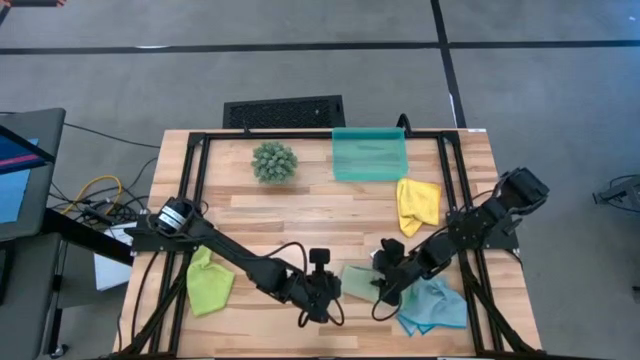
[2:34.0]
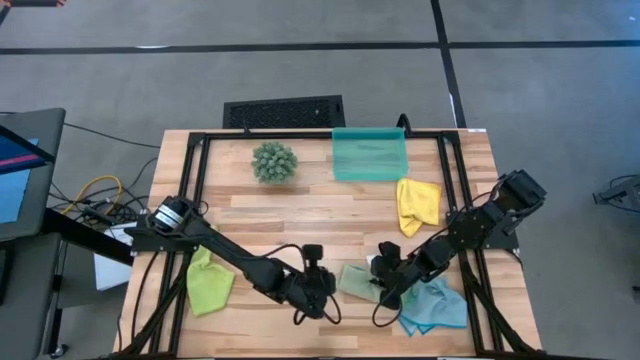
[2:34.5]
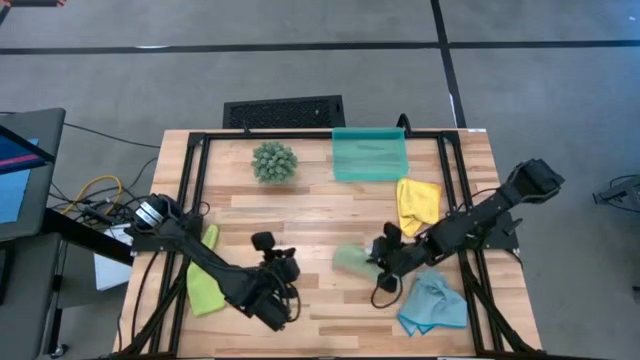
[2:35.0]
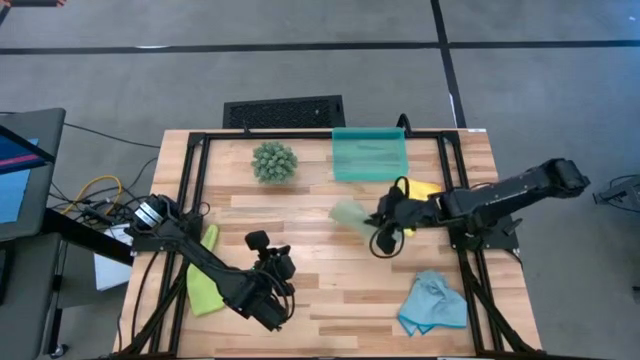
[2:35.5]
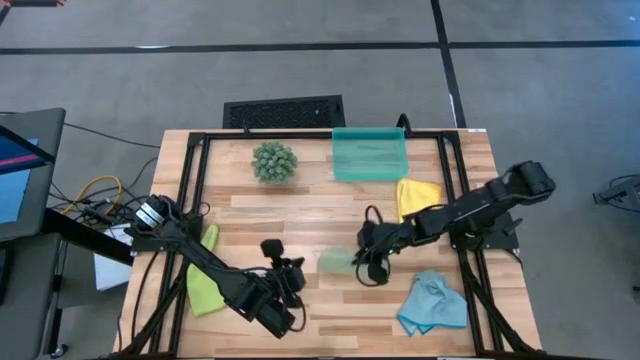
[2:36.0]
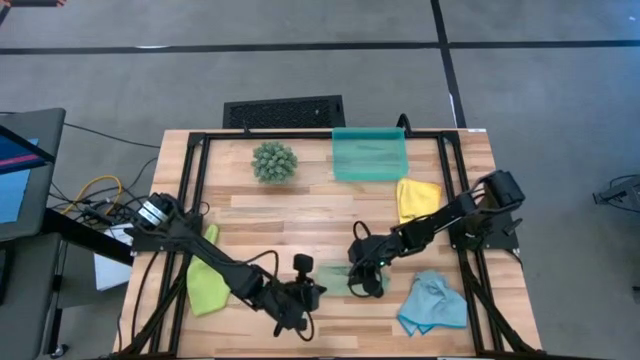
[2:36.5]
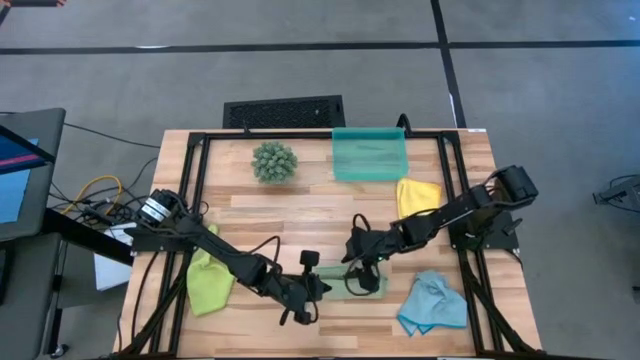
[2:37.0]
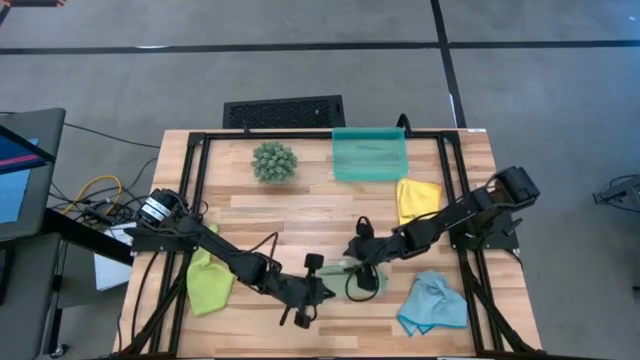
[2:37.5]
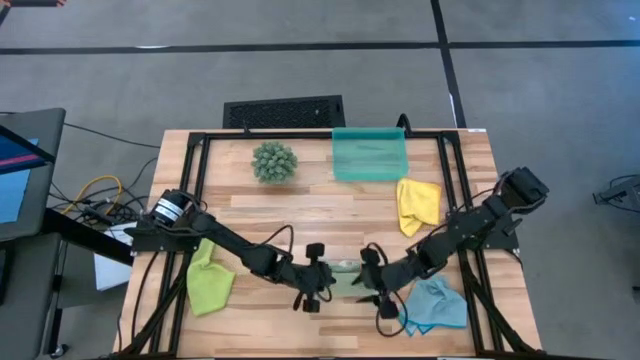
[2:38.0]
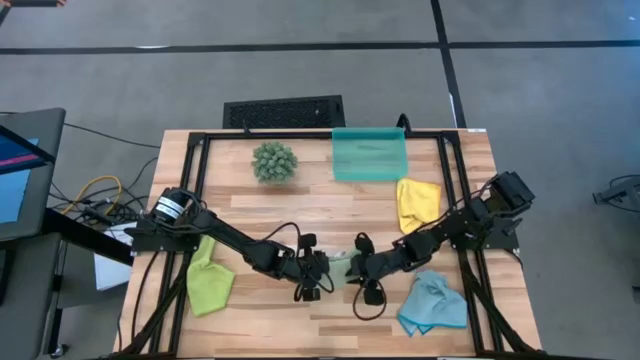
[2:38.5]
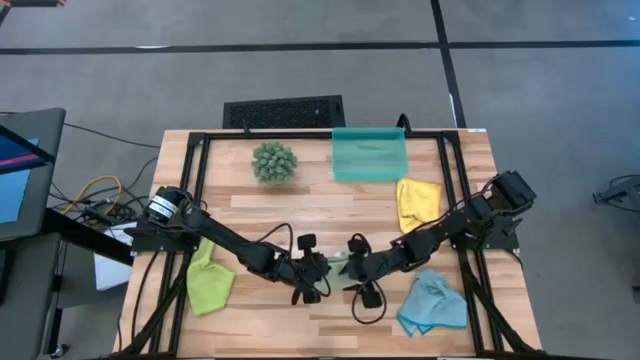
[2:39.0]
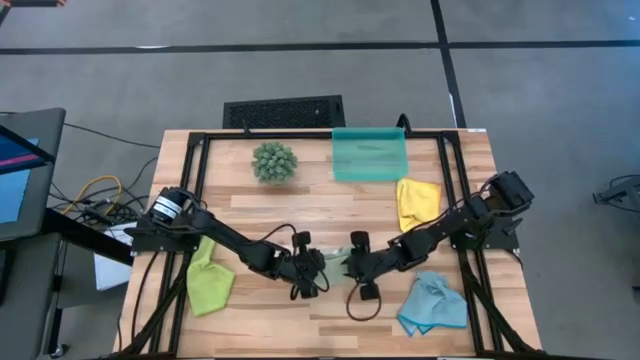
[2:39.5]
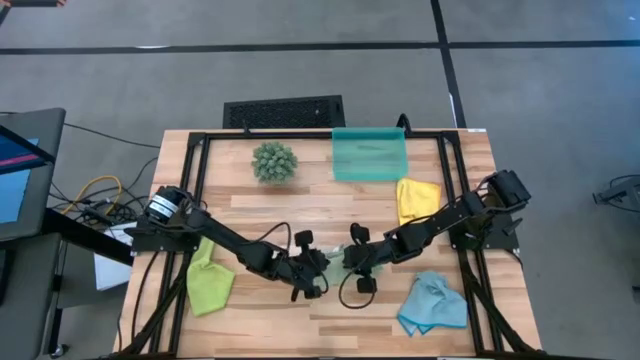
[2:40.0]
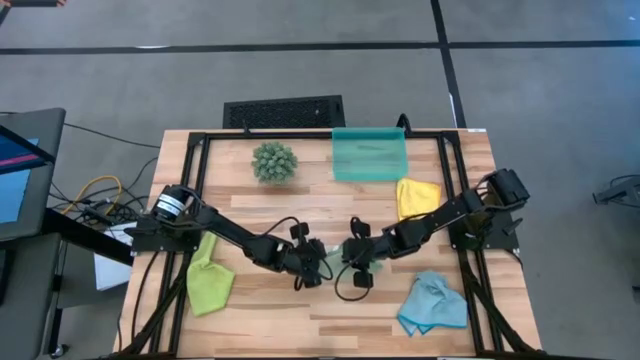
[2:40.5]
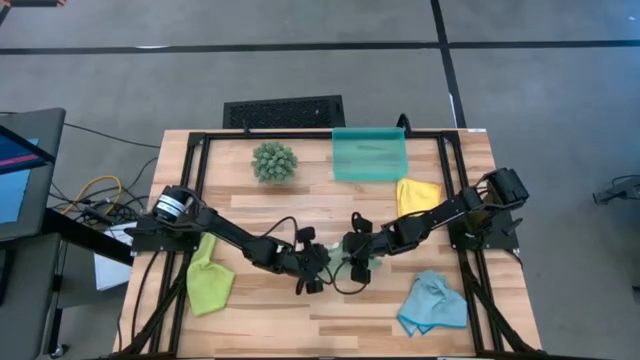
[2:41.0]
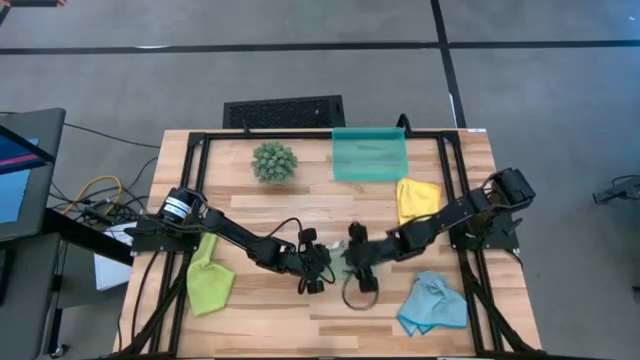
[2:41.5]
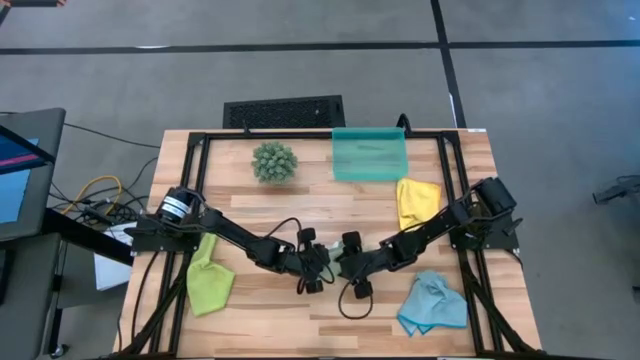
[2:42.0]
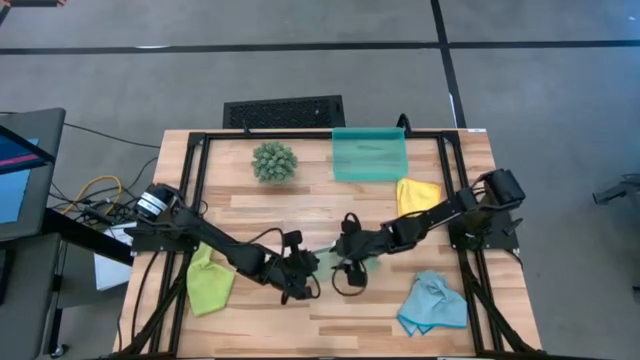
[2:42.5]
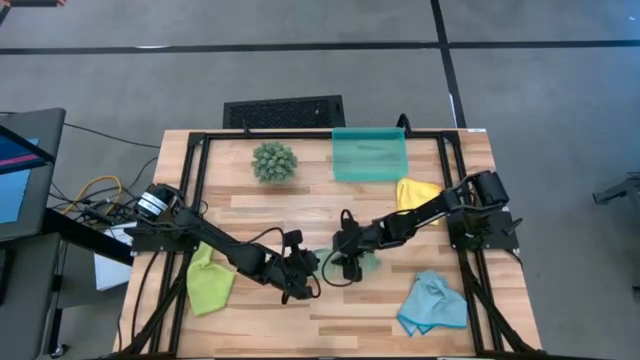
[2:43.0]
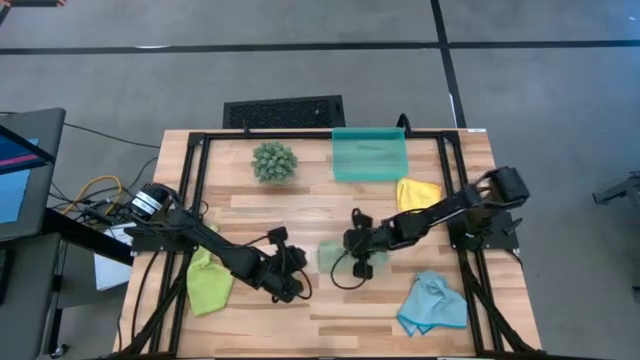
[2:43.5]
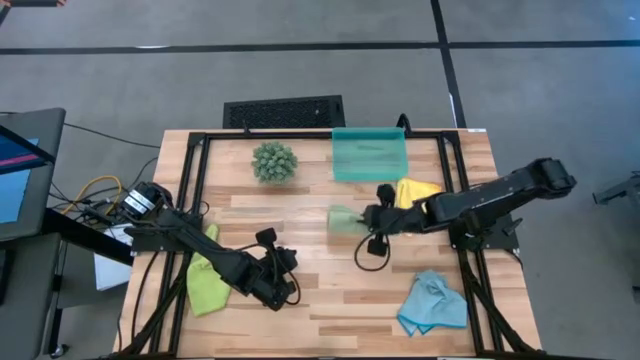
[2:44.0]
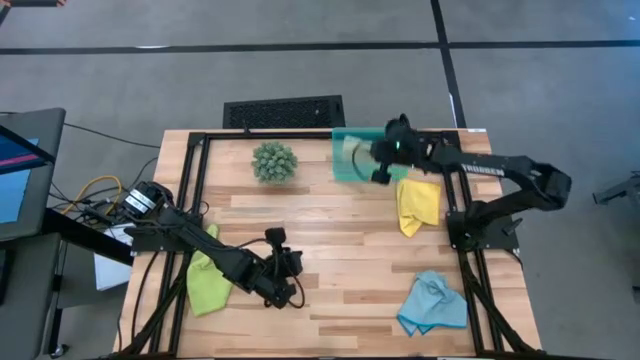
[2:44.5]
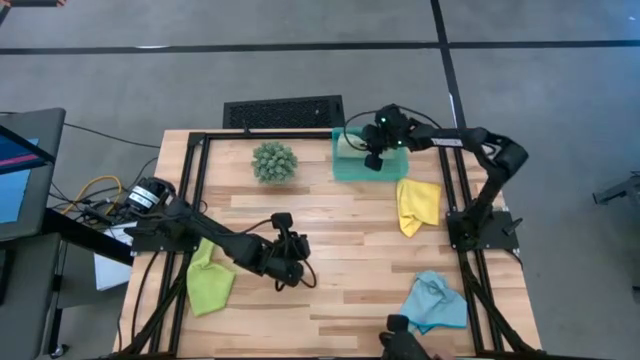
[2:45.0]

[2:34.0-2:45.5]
Task: Roll microfiber towels into tight, uniform cylinder then place into a basket
Put the green microfiber cloth into the green organizer bin

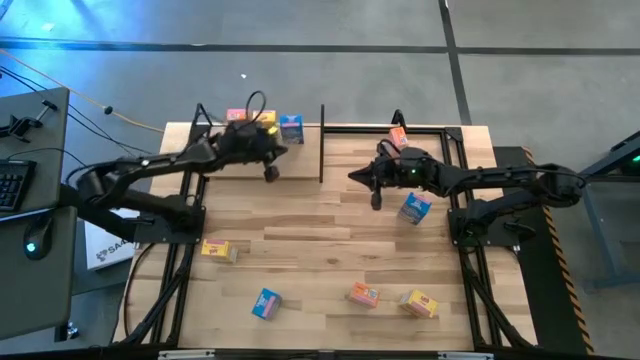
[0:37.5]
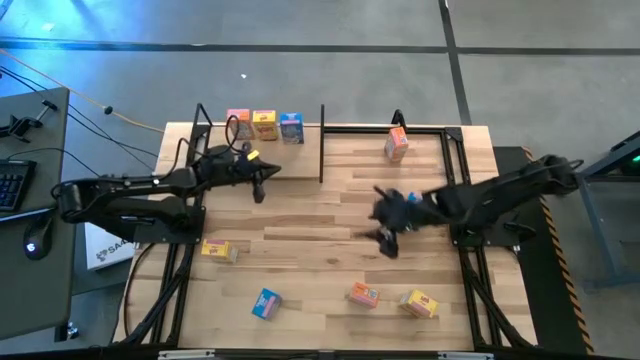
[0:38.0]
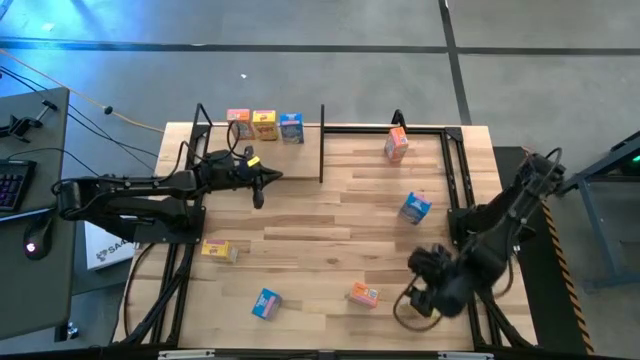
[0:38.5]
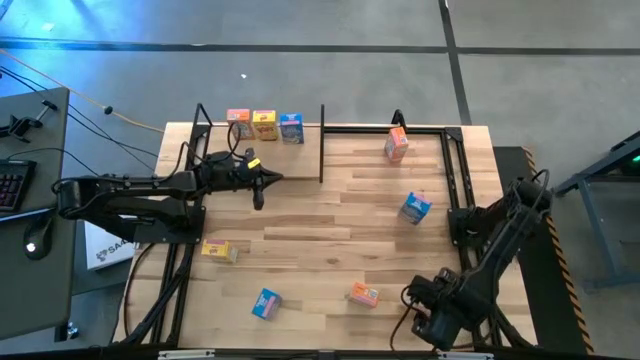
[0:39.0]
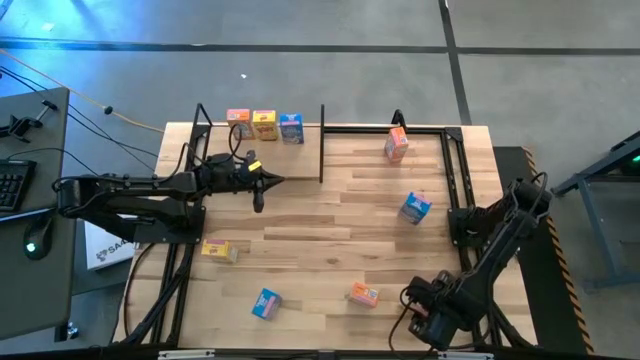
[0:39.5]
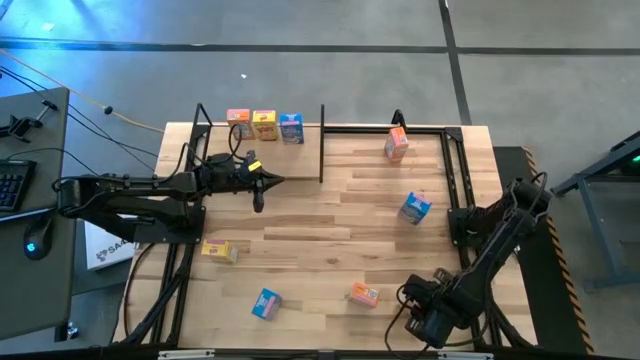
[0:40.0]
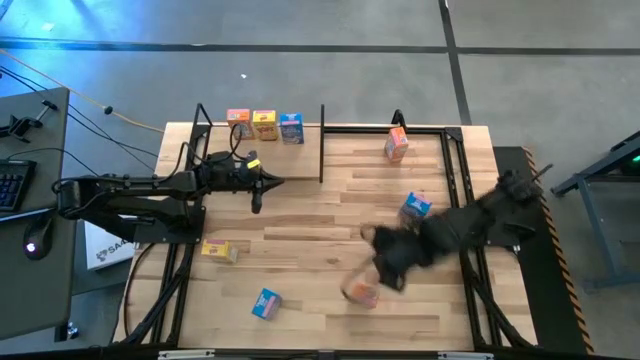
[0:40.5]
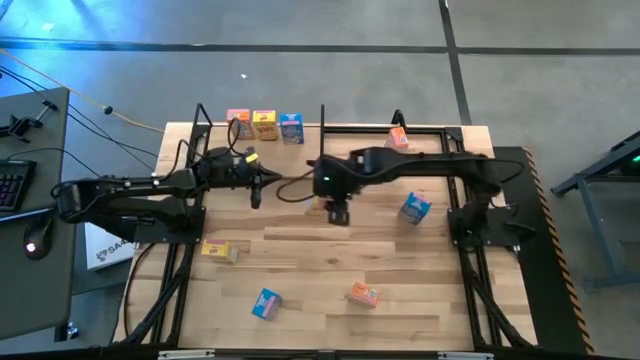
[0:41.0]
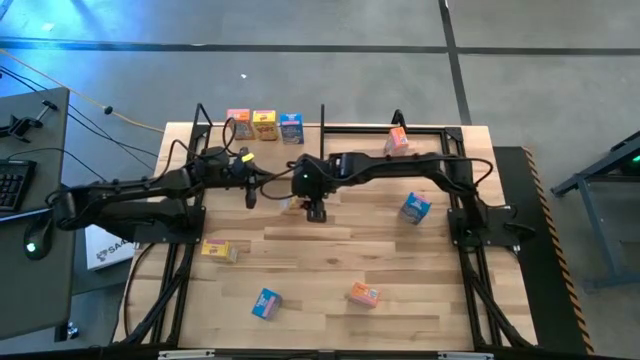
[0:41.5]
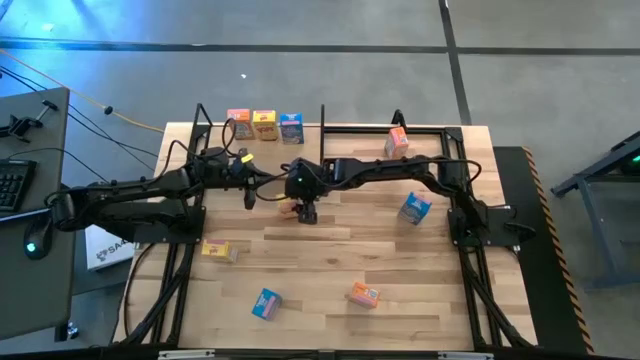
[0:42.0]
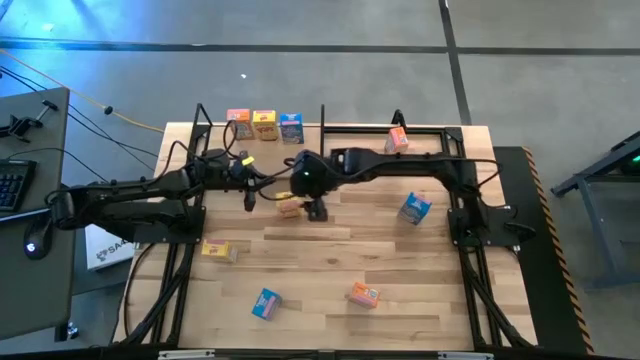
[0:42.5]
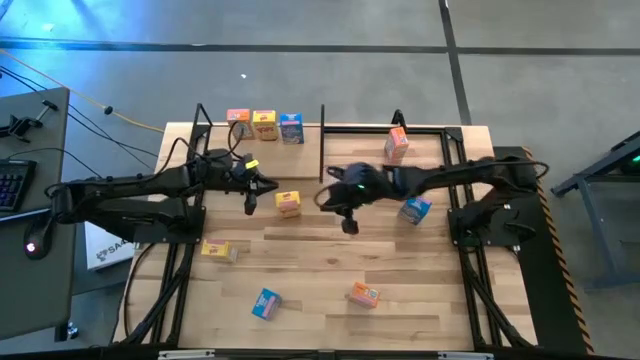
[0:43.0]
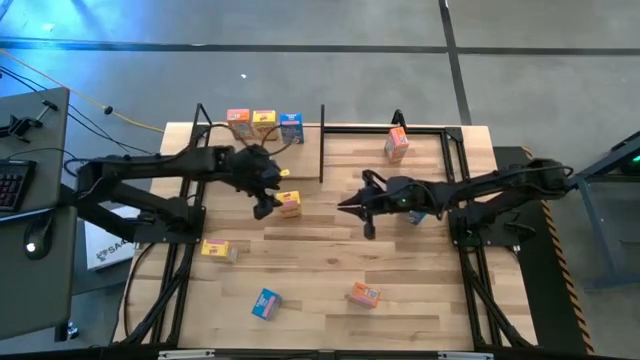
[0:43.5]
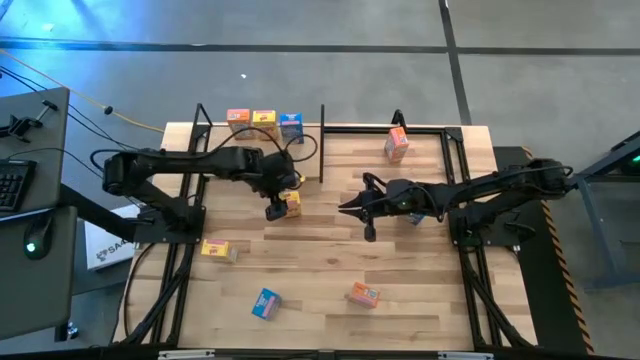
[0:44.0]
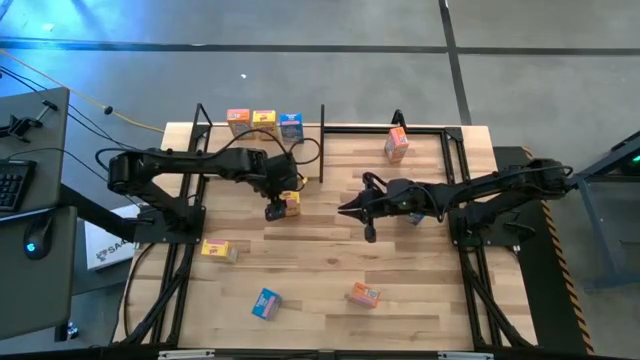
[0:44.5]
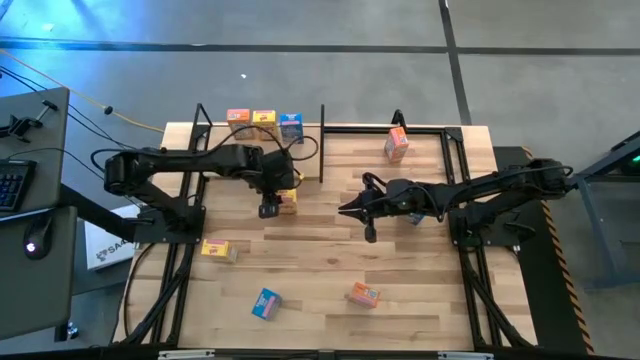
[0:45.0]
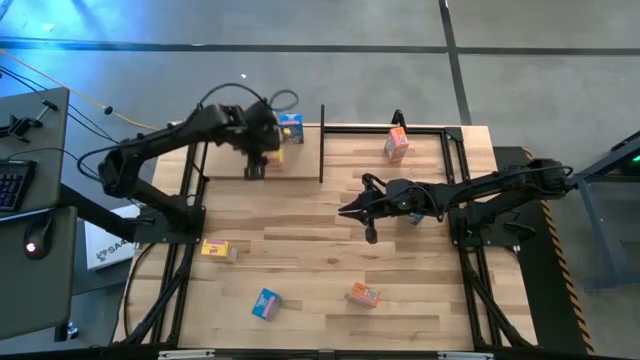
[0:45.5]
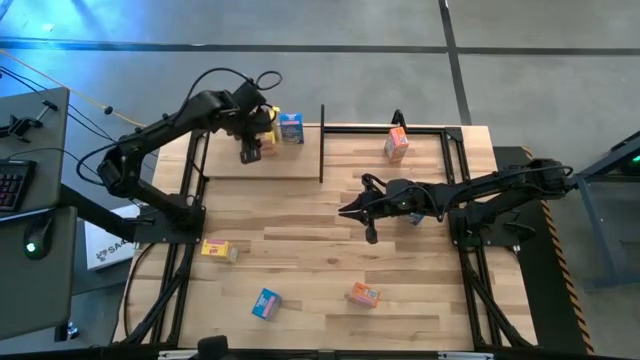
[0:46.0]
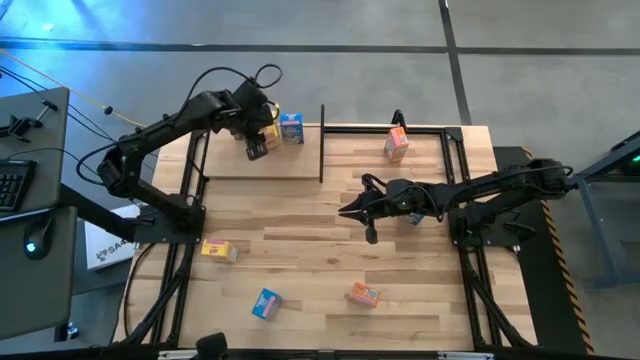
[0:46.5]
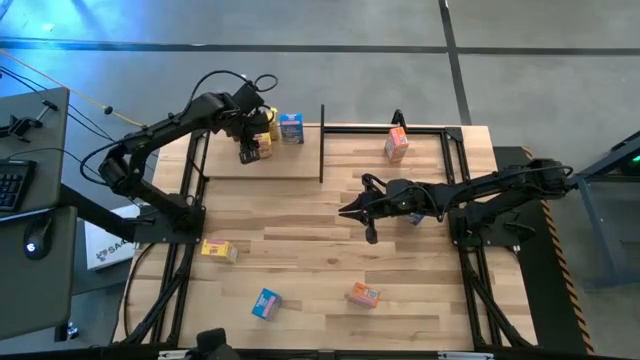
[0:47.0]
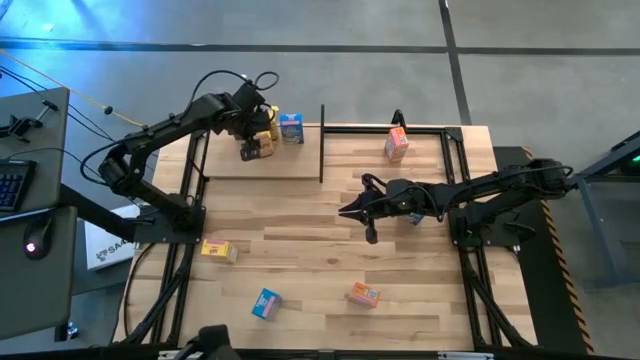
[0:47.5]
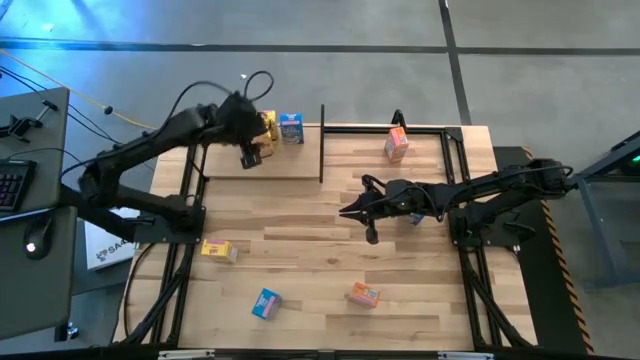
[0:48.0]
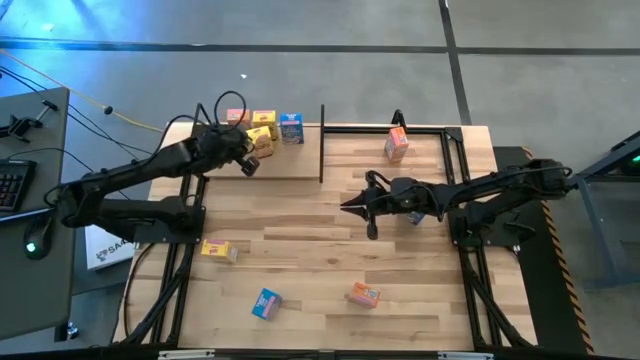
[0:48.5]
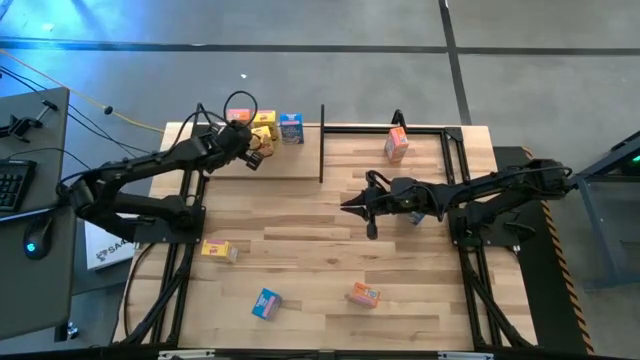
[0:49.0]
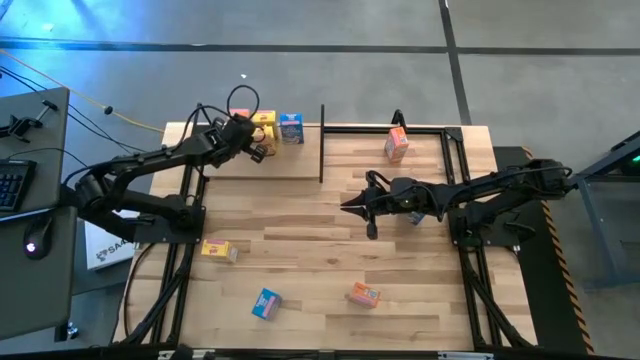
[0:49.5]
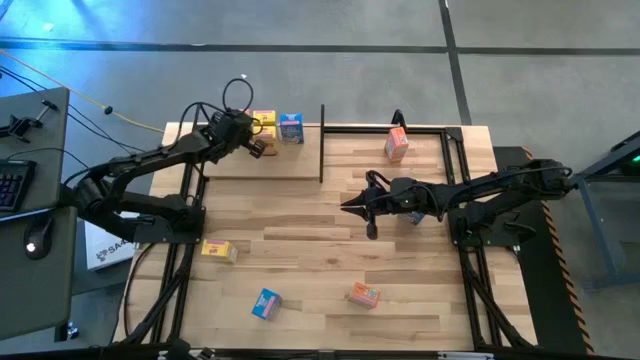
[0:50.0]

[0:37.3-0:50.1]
Task: Stack cereal on shelf
Put the bottom yellow cereal box on the shelf aligned with the other yellow cereal box
